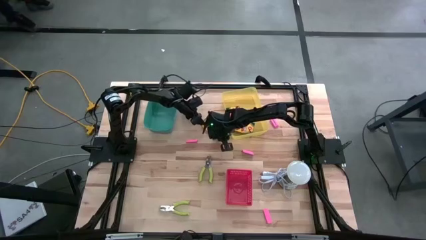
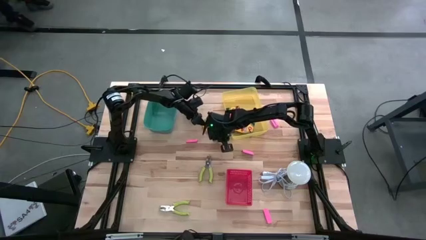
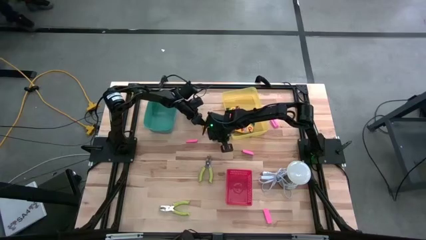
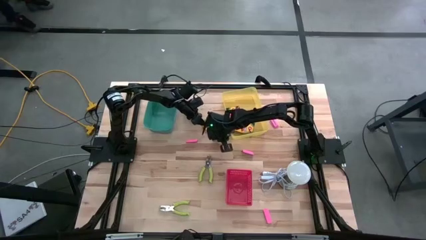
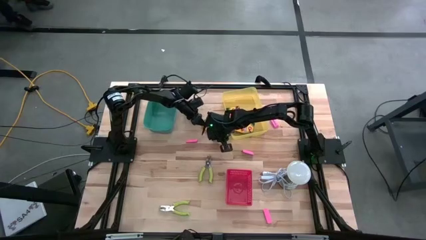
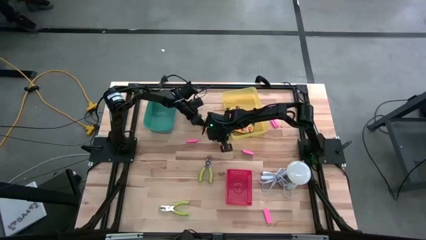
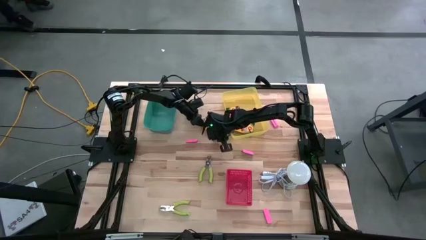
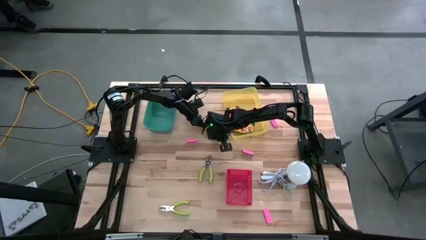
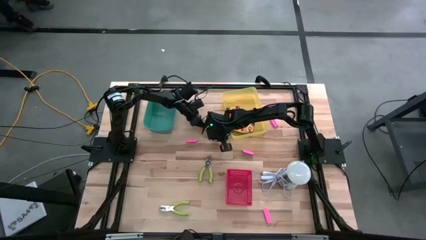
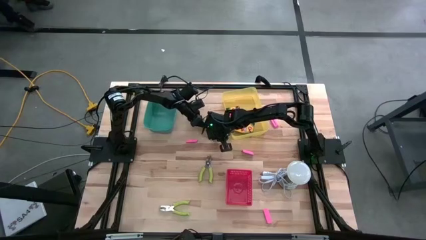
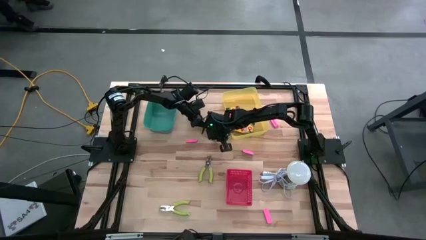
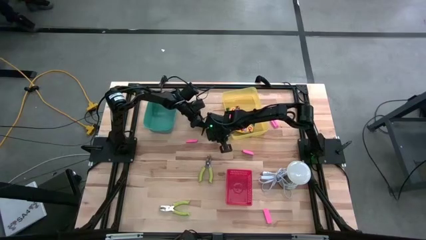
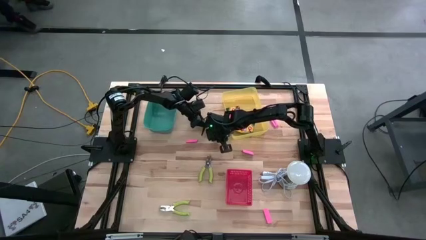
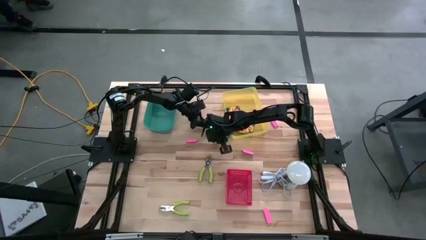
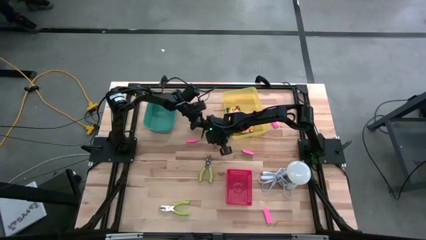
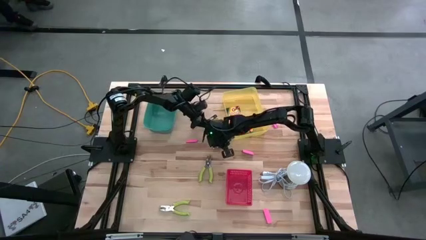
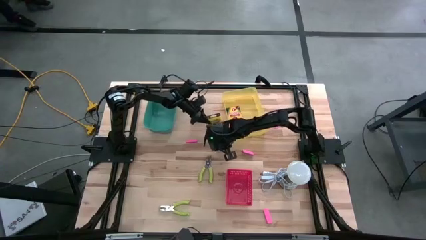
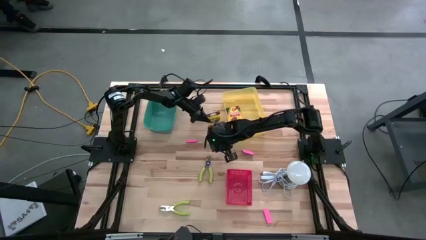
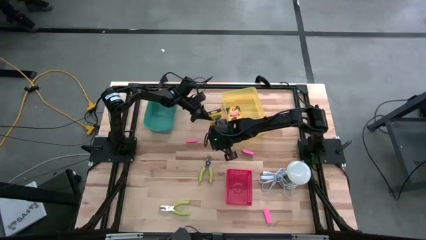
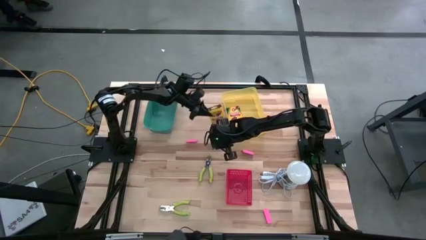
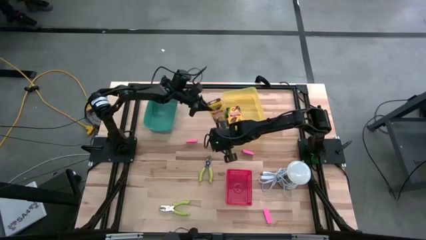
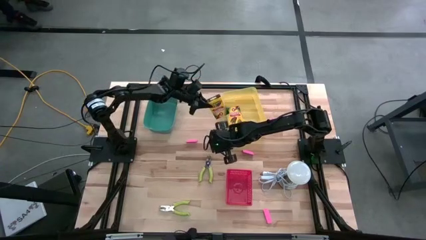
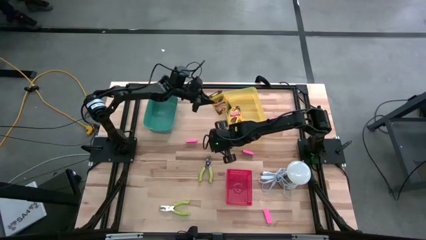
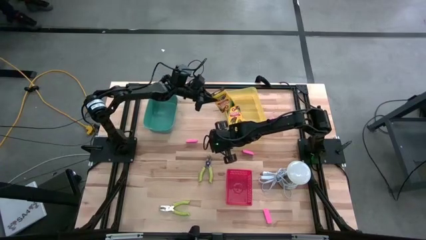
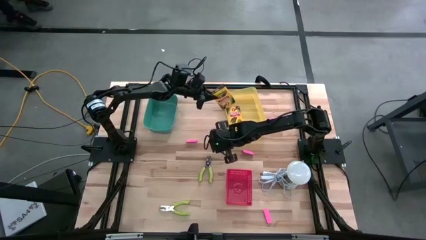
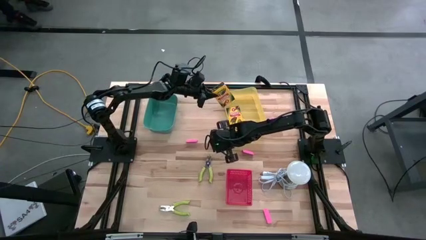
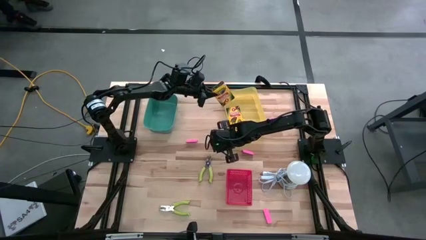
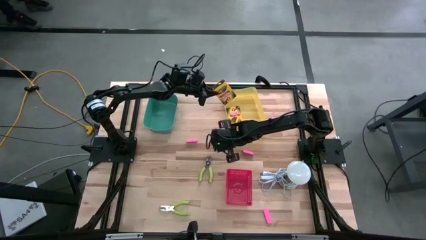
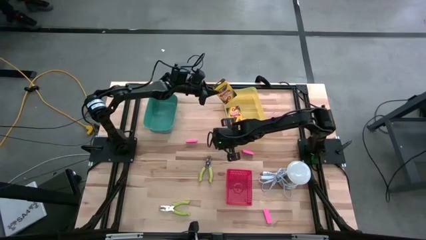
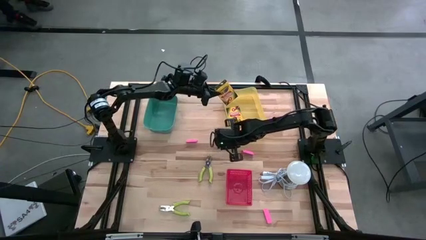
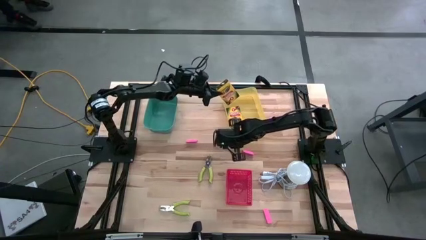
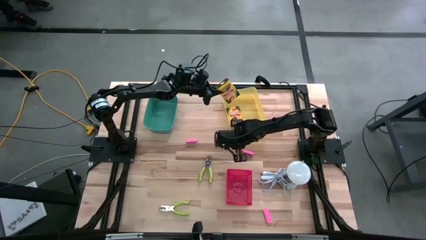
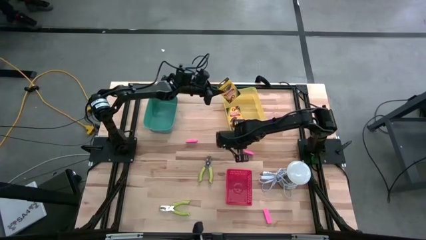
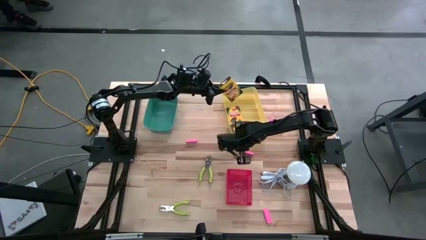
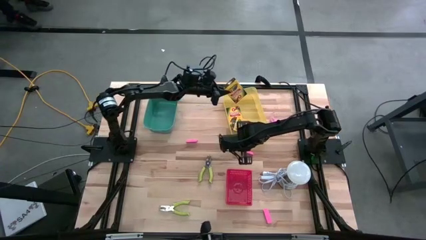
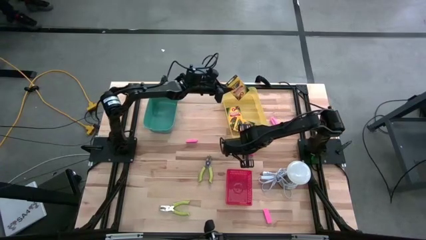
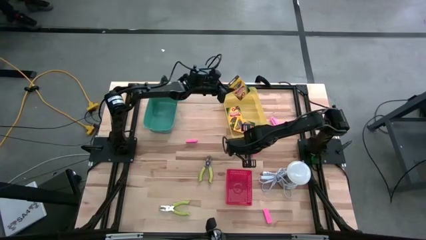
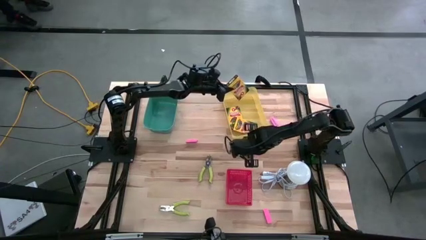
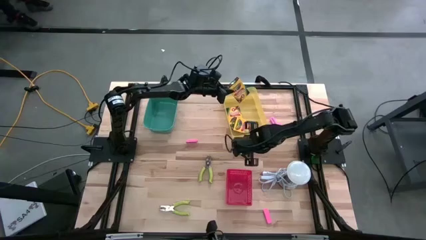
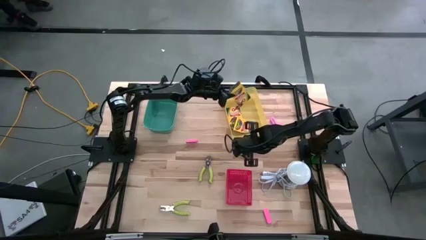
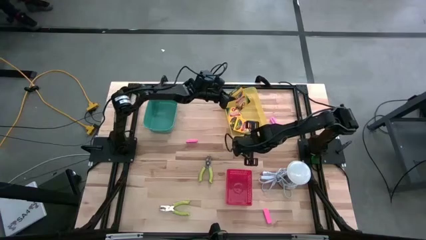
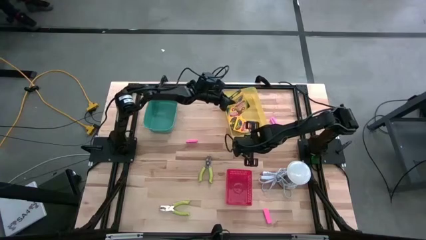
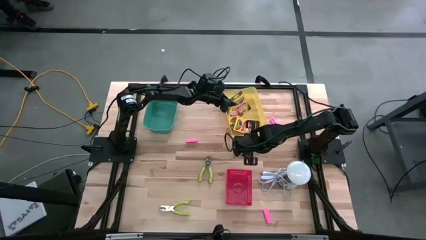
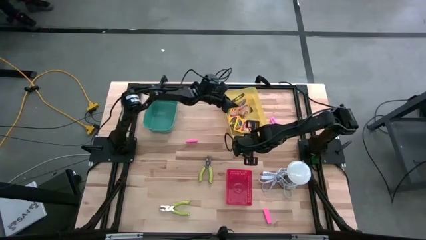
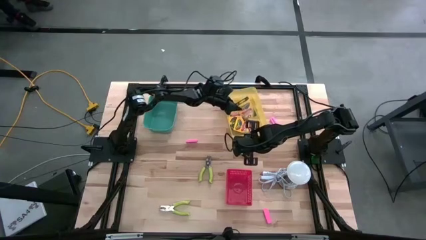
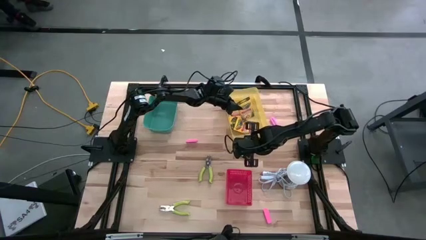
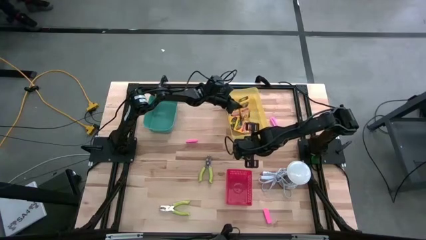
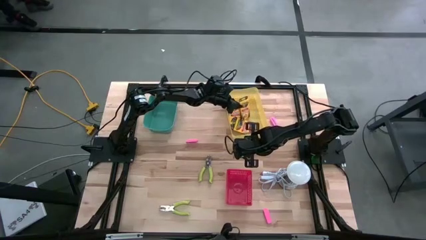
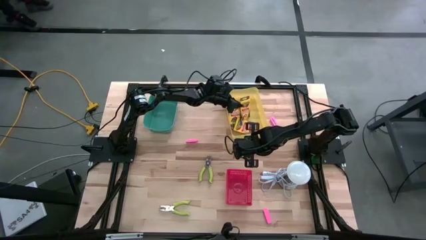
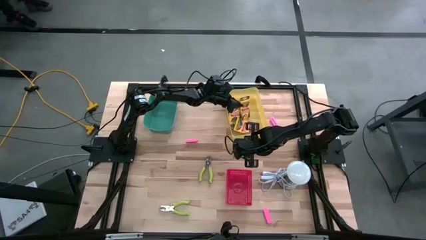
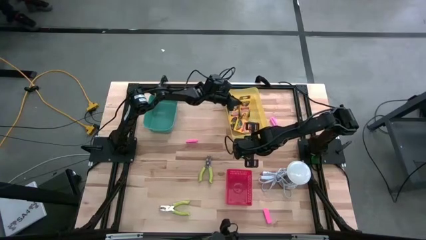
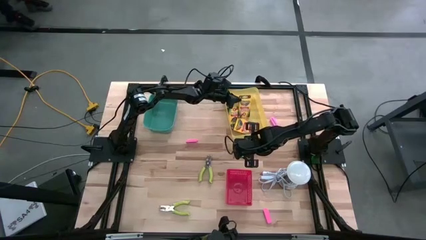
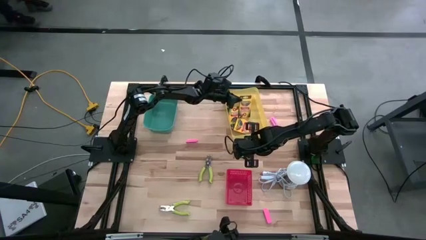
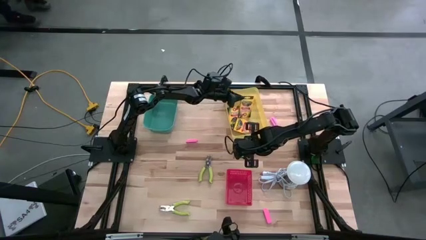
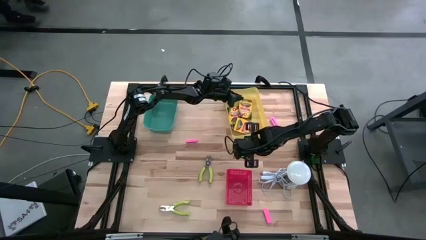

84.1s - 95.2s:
Task: Pick & Place School Supplies
Put the crayon box into the yellow bin
